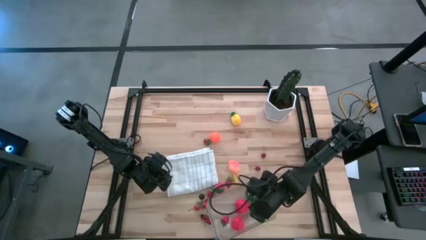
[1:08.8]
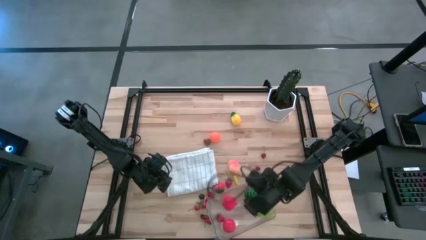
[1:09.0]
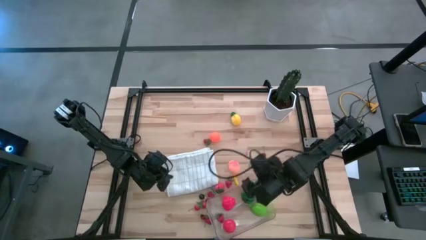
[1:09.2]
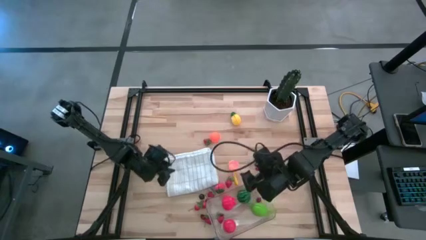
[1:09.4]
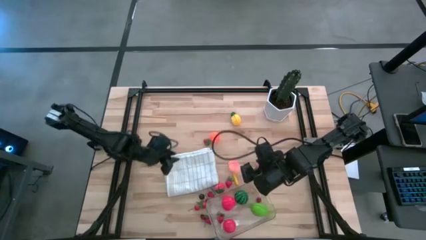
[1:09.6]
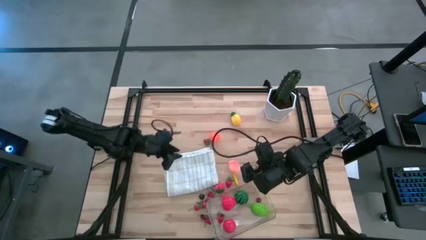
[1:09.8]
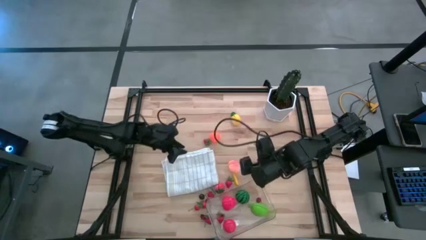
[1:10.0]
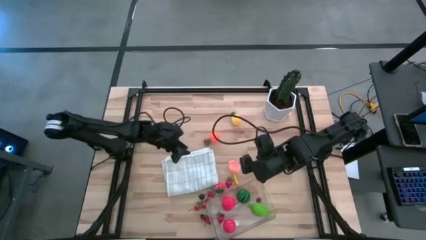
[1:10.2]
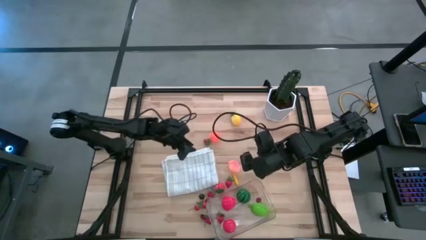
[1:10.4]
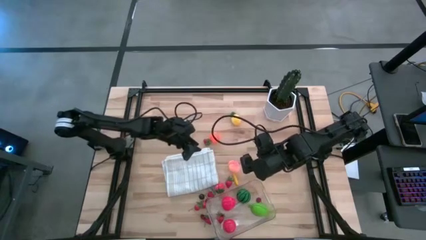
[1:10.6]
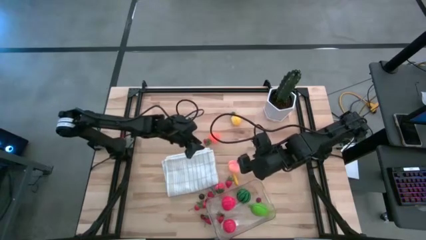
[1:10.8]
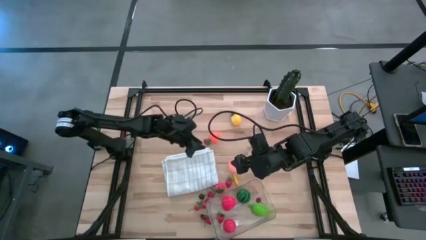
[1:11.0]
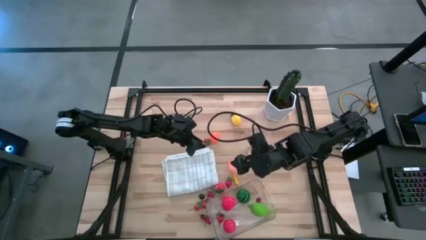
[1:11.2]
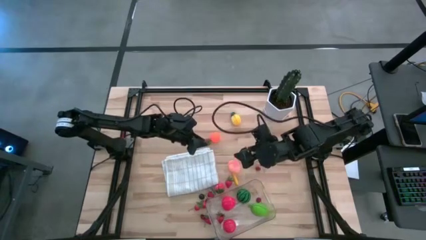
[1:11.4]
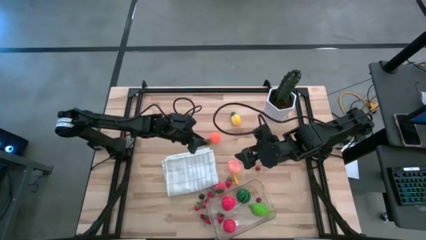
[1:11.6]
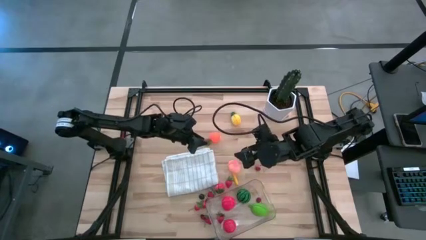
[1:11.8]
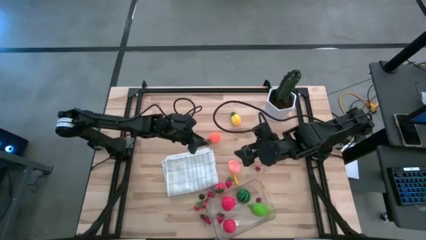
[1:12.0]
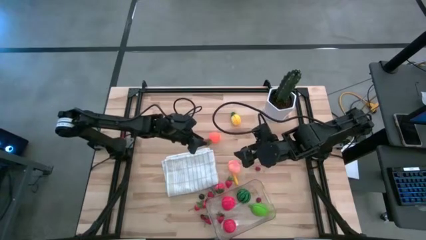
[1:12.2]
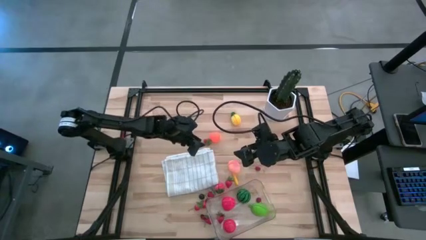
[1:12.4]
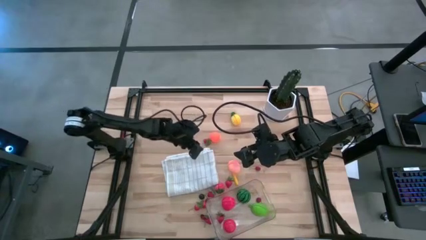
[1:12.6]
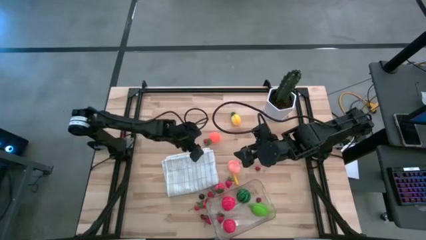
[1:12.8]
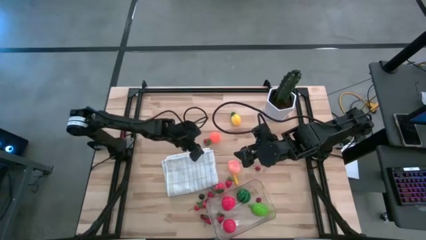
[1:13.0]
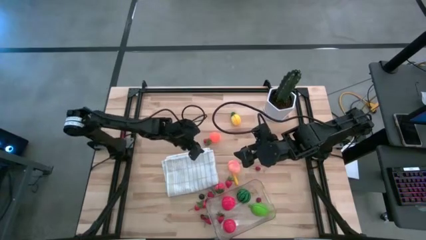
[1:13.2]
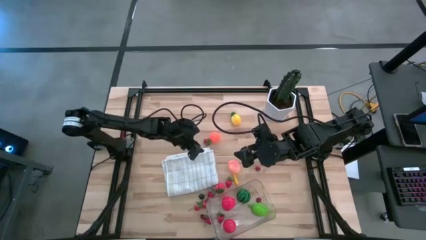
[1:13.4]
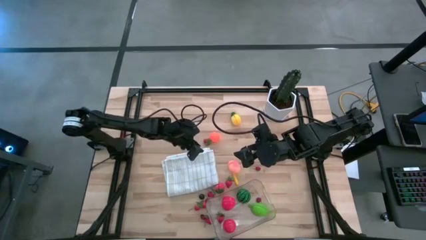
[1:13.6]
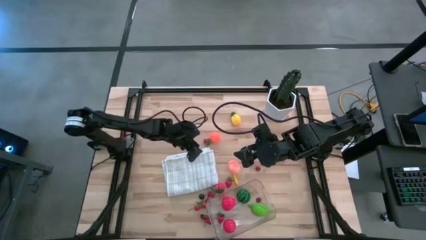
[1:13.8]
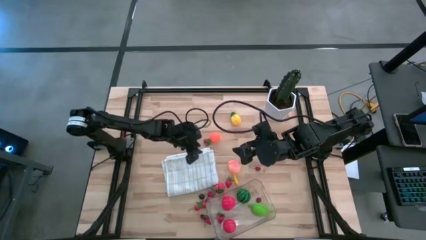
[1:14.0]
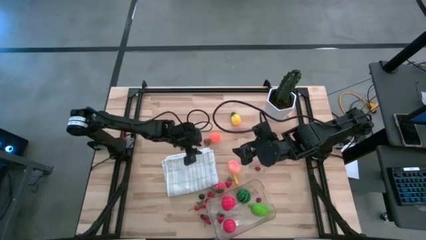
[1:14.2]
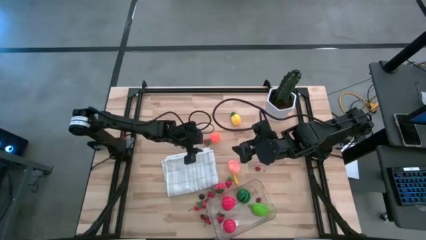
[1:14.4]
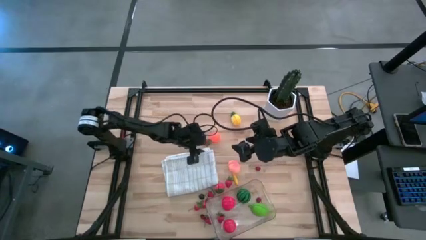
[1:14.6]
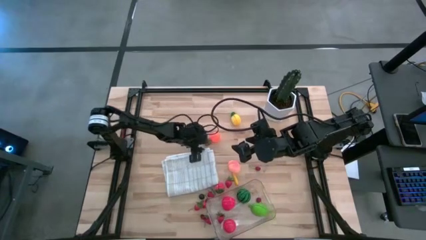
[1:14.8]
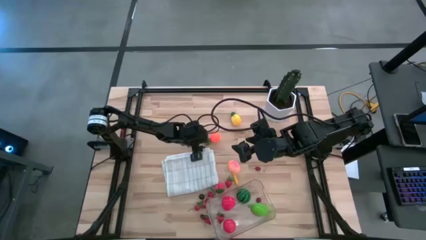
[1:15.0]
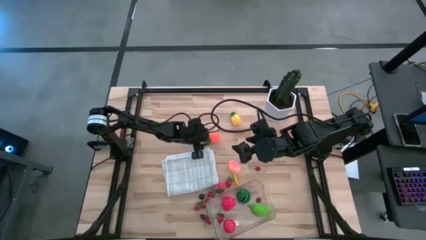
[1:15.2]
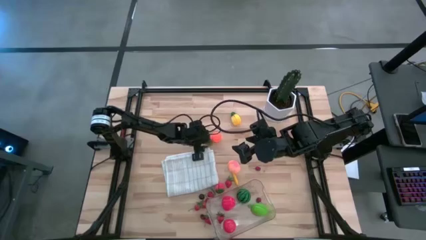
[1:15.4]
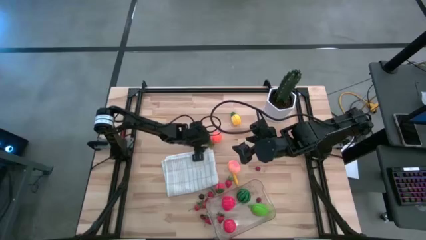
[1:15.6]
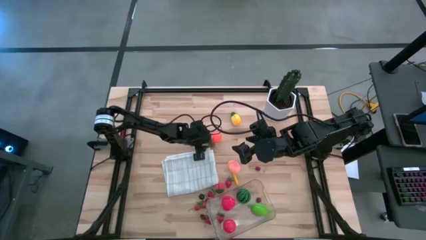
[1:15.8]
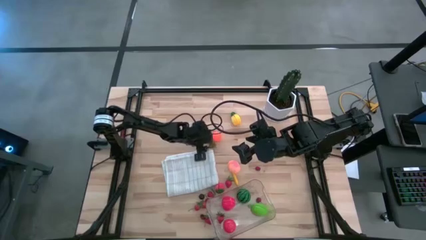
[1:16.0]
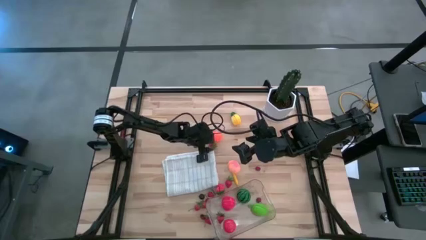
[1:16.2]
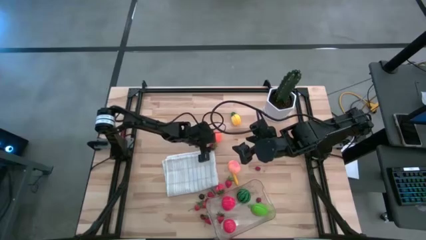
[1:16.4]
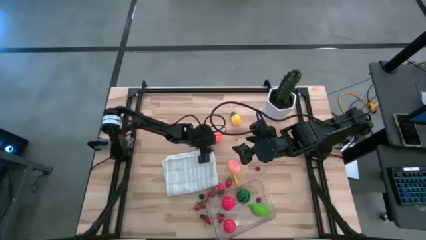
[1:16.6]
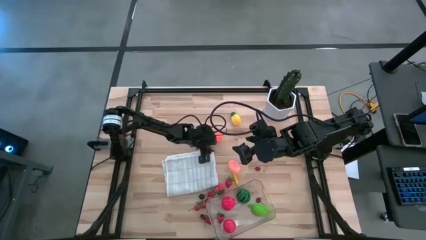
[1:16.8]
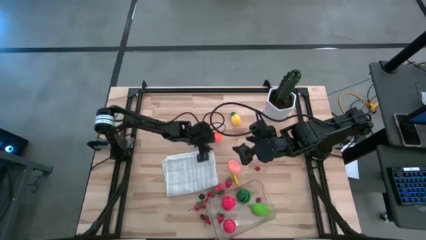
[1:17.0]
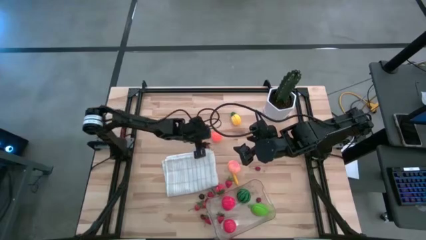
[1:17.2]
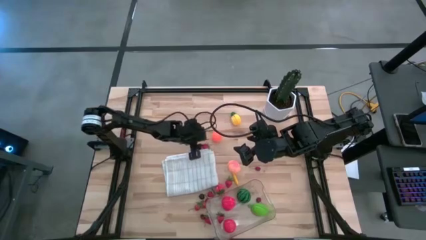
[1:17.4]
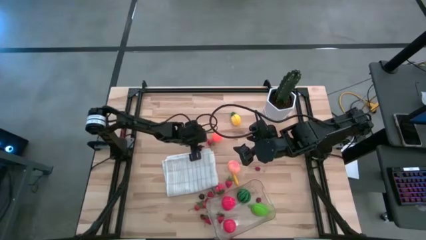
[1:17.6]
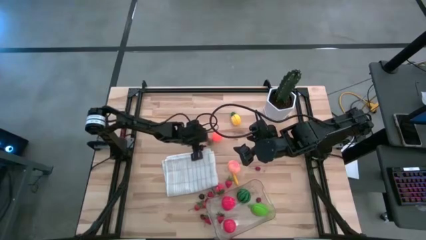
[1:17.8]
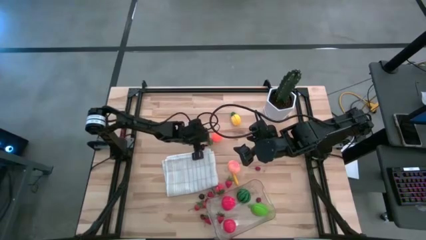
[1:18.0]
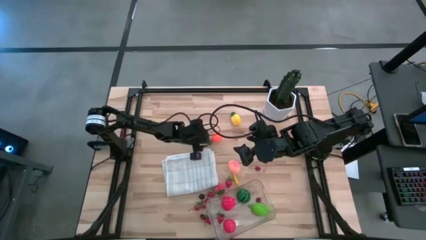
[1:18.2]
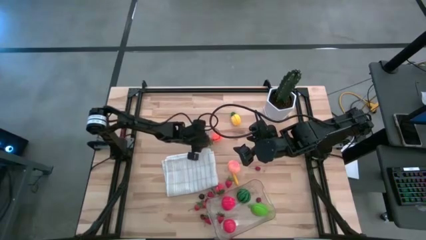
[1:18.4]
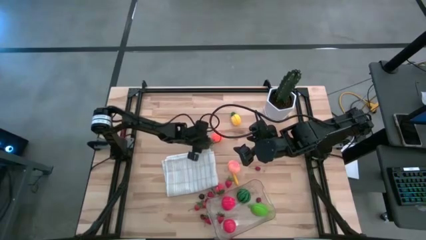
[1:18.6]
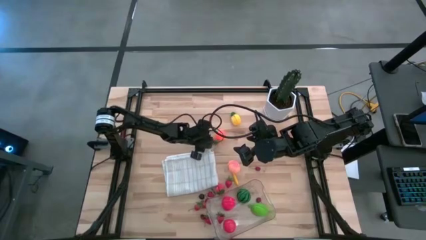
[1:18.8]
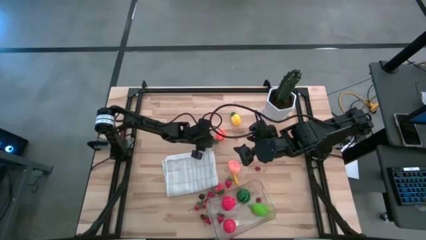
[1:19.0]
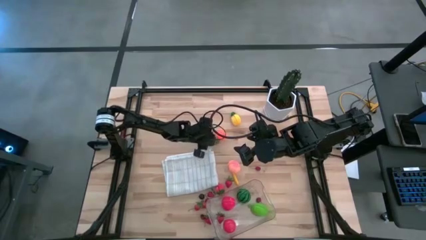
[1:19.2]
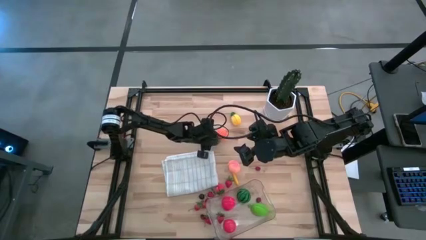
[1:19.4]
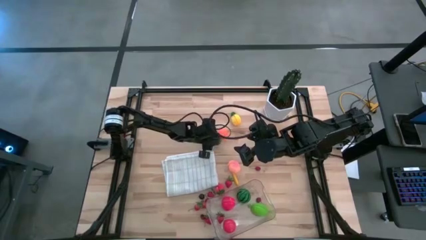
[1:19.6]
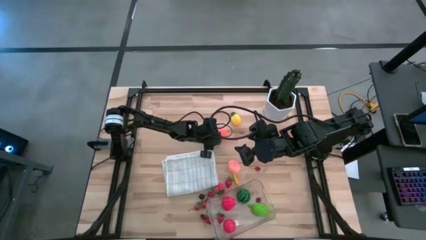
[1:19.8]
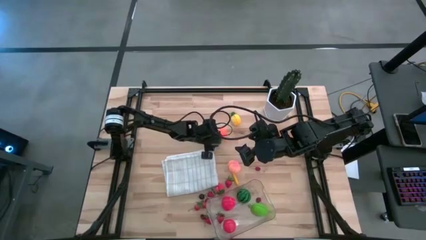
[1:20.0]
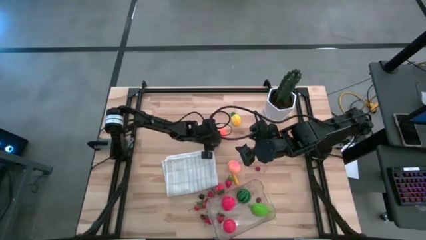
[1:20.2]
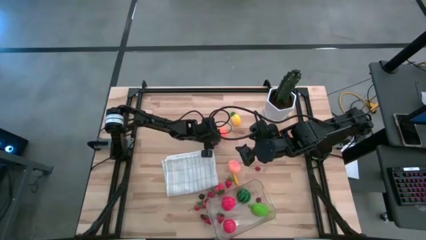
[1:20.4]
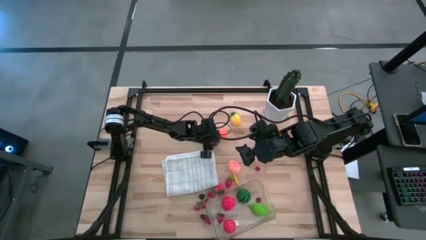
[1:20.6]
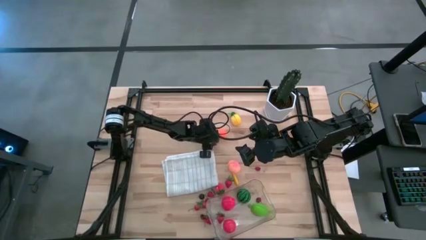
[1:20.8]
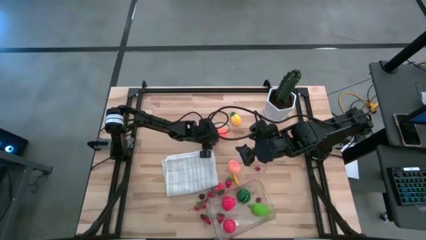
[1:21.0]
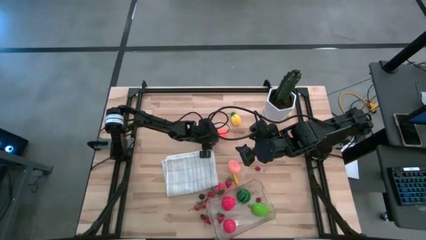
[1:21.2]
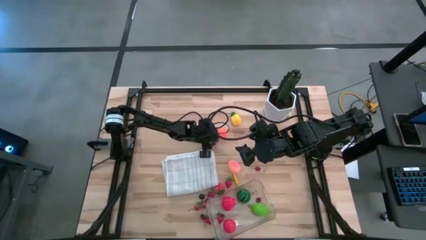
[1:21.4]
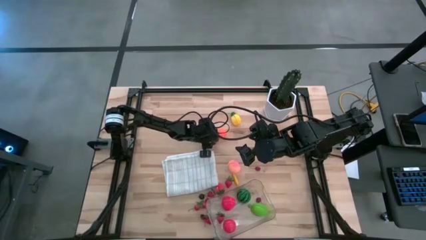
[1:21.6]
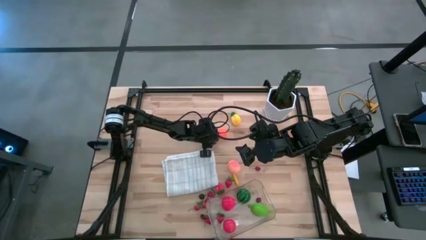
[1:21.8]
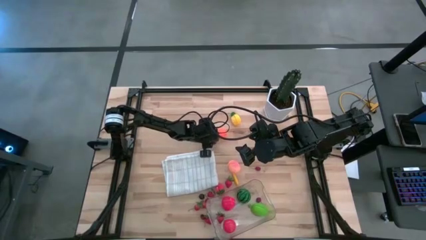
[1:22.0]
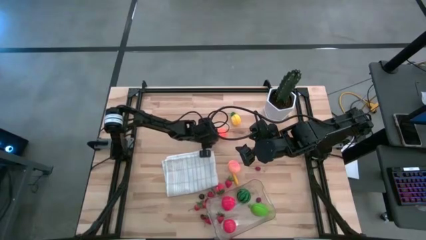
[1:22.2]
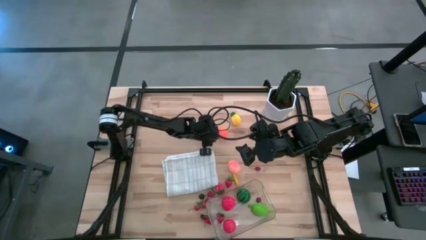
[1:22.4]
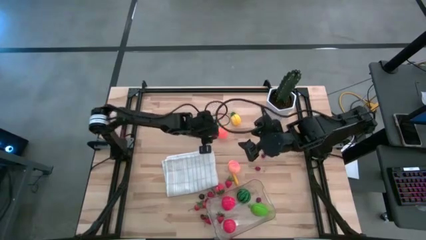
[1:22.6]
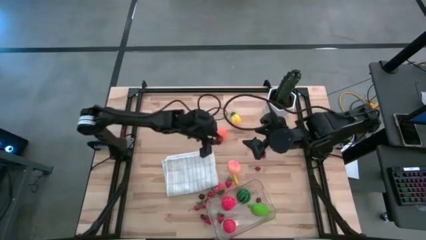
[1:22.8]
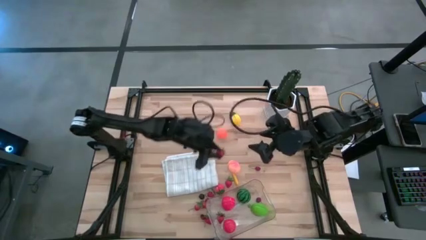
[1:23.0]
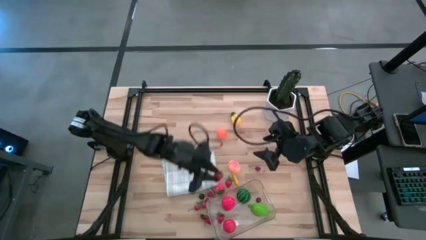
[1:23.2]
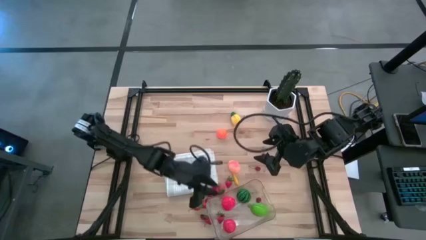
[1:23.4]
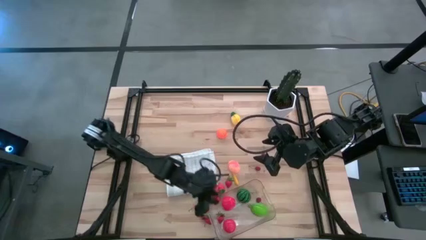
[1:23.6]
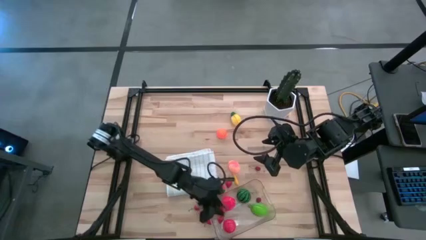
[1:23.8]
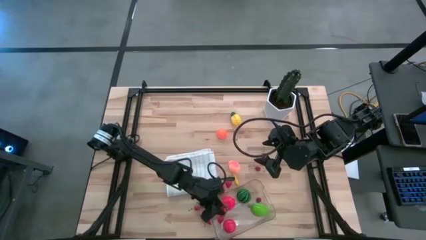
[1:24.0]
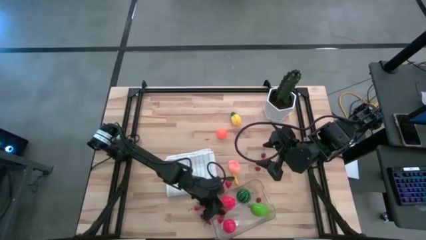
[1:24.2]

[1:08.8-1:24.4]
Task: Pick and placing Produce into tupperware
Put the strawberry into the transparent bin

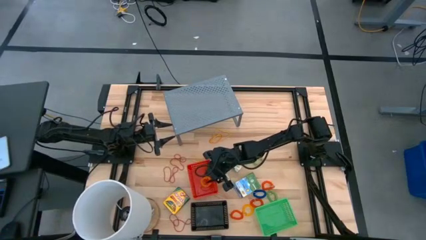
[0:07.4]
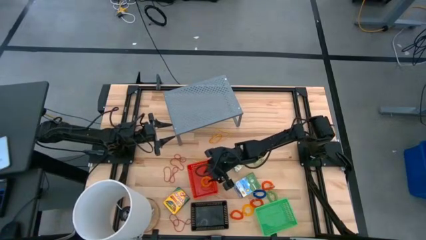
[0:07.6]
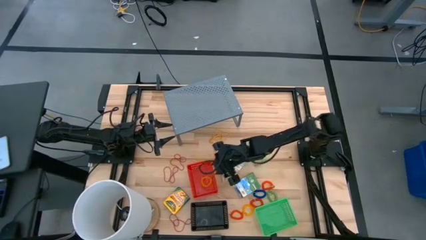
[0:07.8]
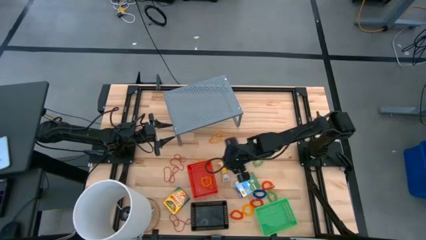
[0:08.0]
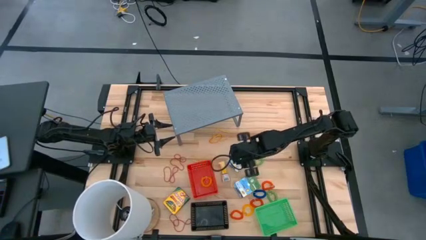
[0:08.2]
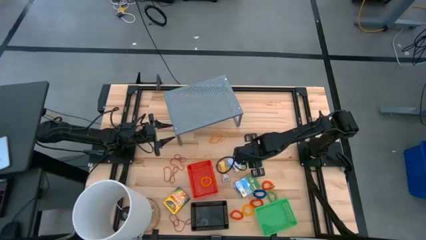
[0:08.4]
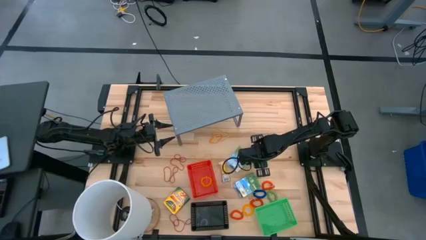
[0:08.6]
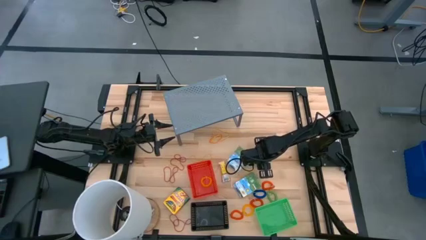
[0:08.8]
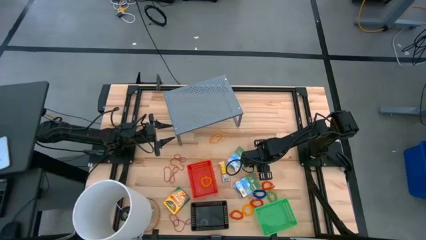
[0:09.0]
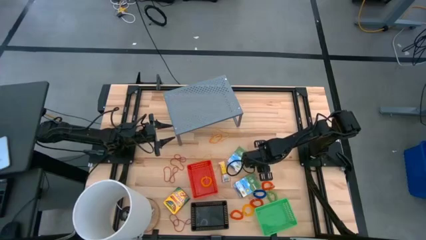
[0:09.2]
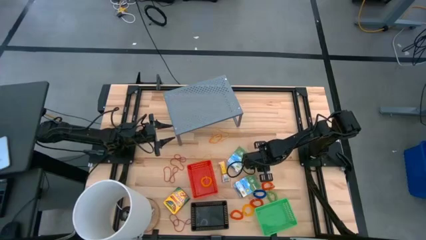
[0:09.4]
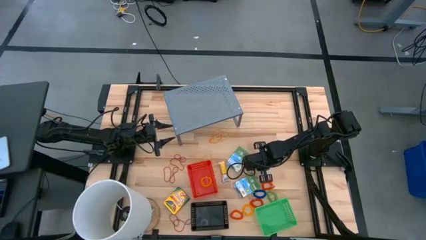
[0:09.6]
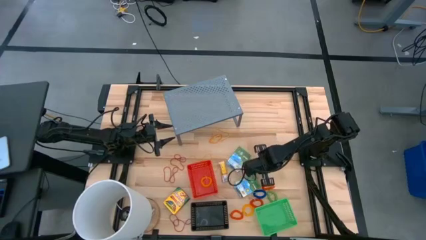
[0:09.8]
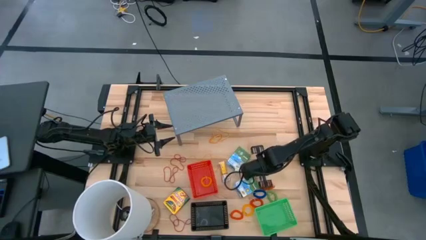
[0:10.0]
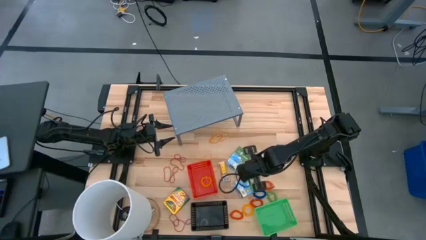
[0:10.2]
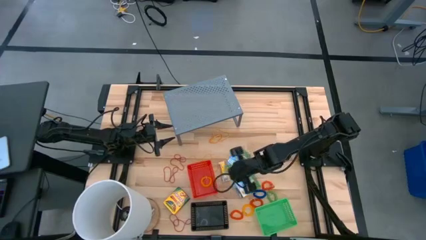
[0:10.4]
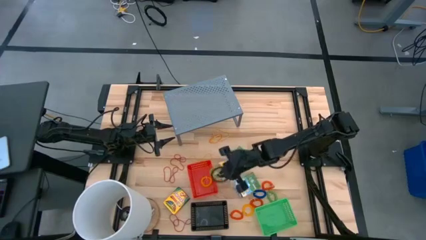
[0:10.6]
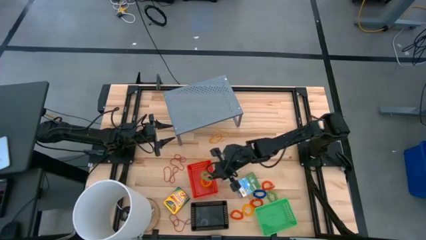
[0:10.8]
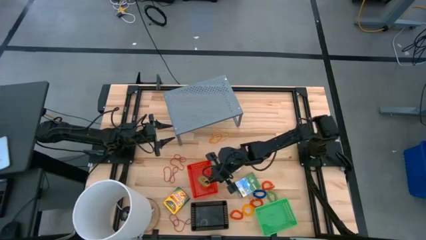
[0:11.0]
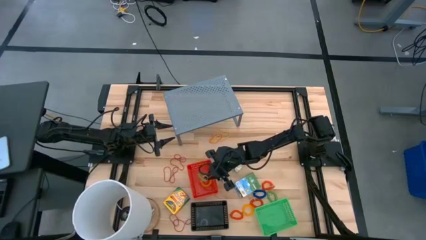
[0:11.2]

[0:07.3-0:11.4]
Task: Pick & Place Office Desk Supplies
Put the top green spring keychain into the red bin
